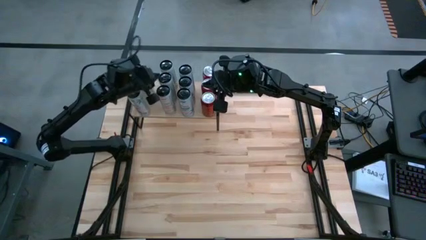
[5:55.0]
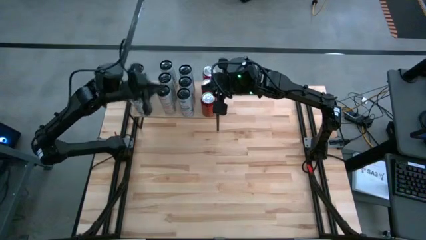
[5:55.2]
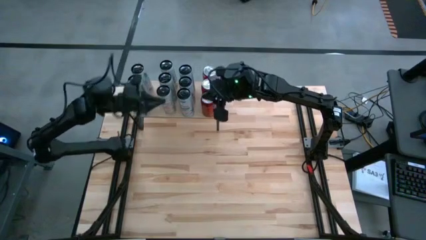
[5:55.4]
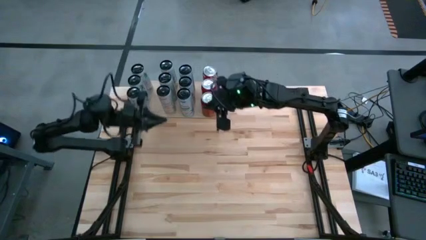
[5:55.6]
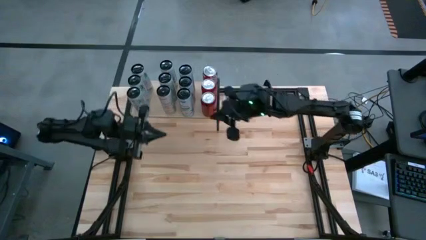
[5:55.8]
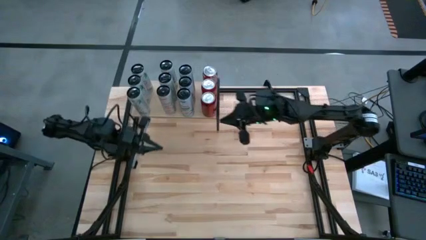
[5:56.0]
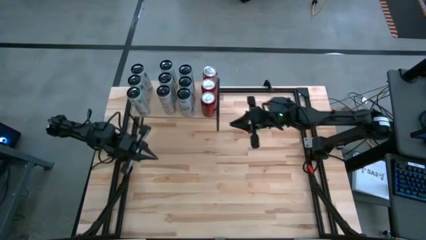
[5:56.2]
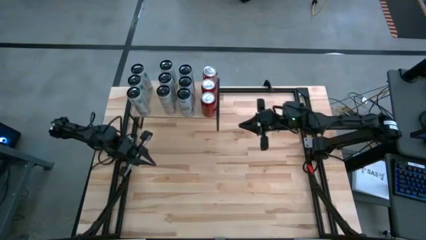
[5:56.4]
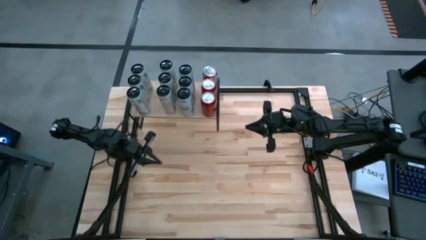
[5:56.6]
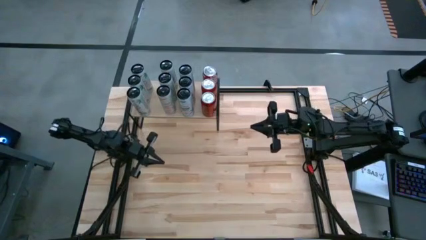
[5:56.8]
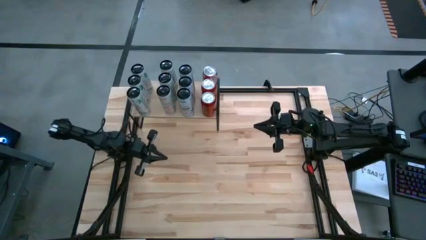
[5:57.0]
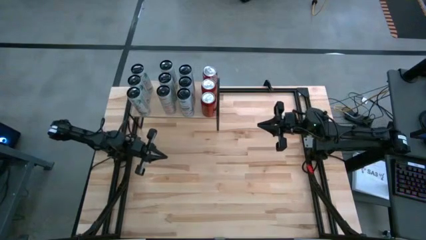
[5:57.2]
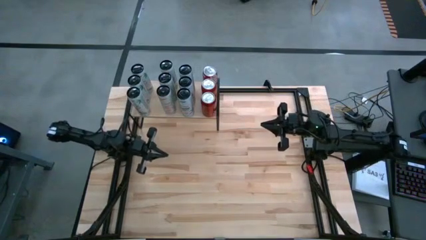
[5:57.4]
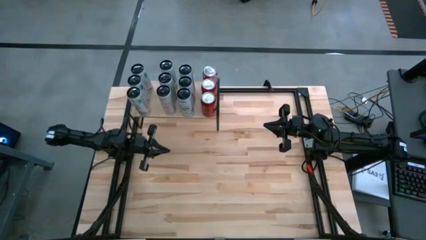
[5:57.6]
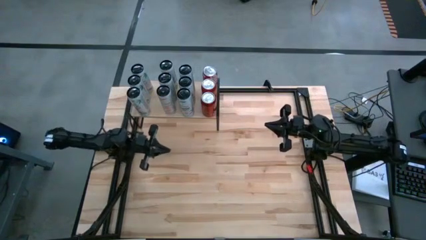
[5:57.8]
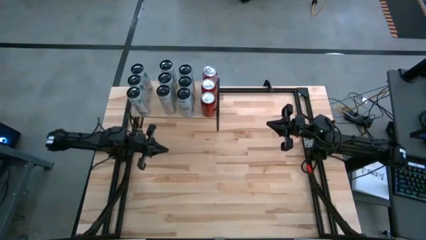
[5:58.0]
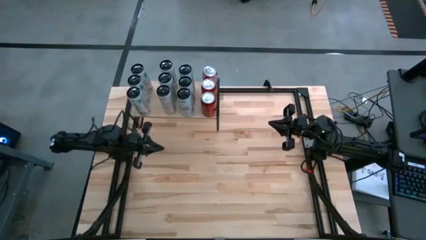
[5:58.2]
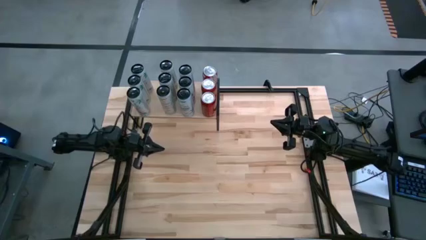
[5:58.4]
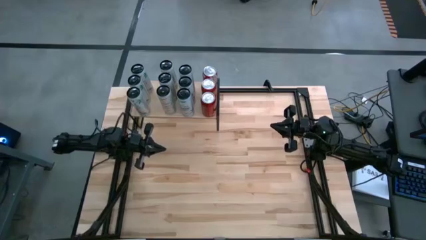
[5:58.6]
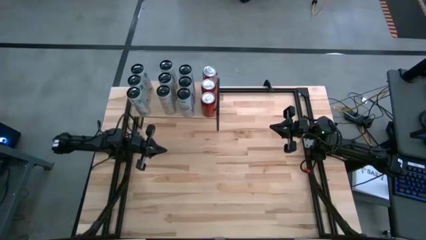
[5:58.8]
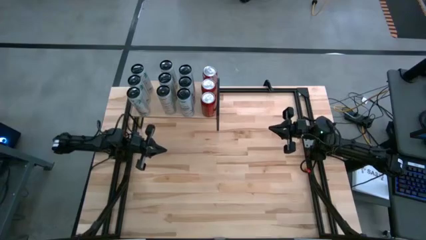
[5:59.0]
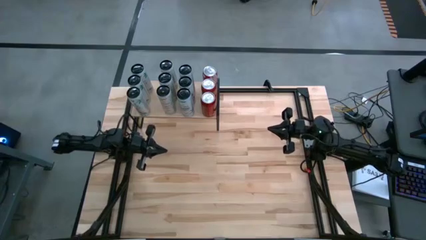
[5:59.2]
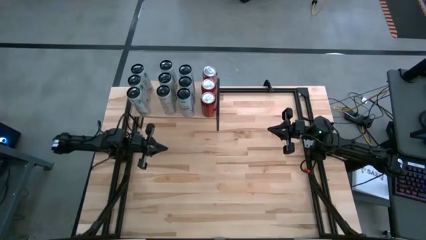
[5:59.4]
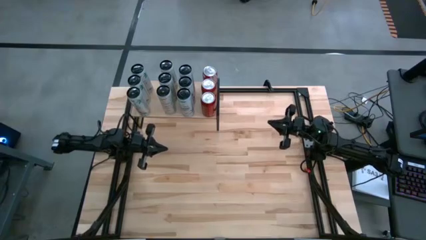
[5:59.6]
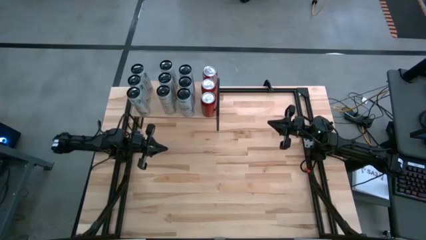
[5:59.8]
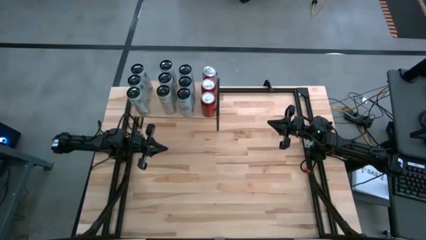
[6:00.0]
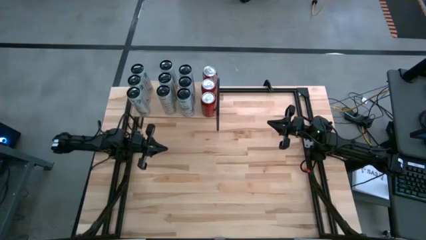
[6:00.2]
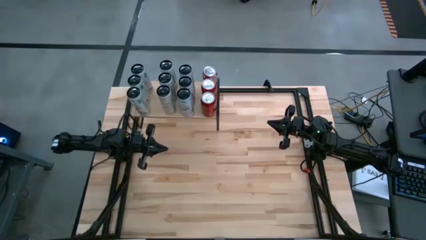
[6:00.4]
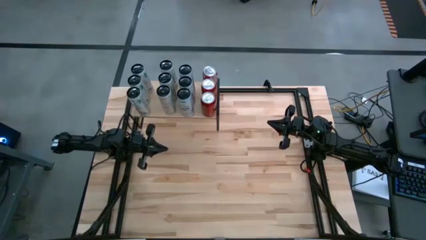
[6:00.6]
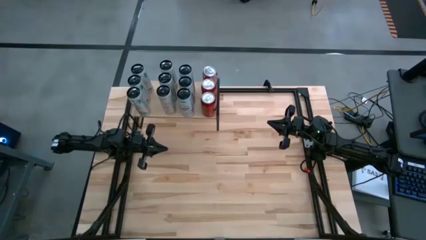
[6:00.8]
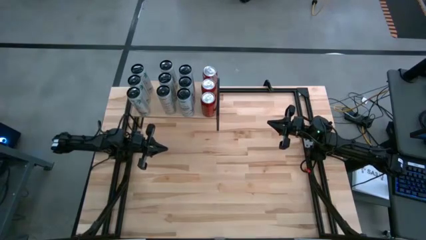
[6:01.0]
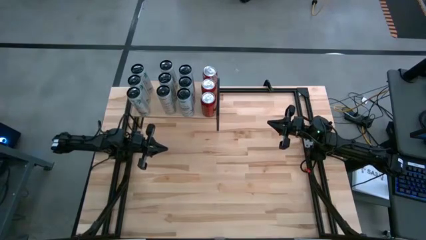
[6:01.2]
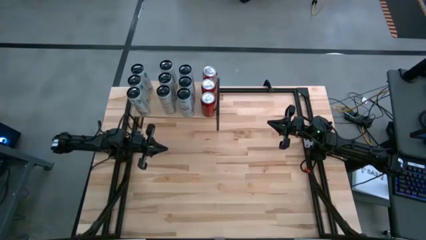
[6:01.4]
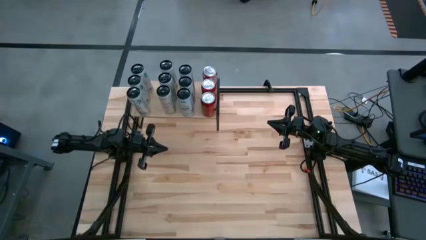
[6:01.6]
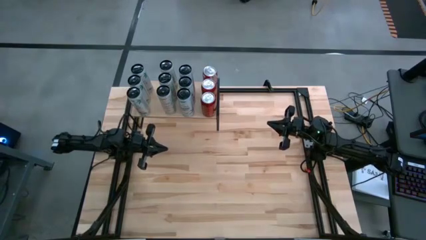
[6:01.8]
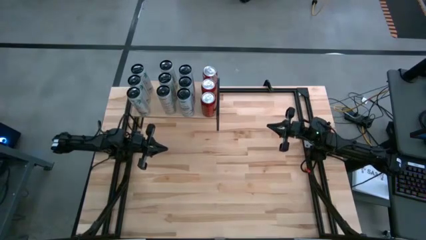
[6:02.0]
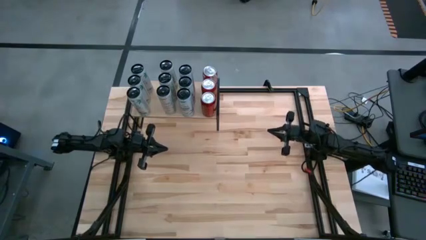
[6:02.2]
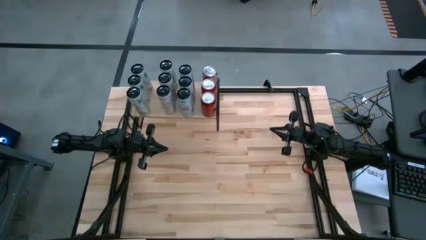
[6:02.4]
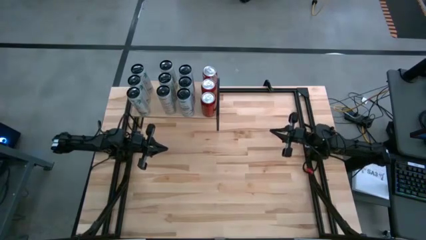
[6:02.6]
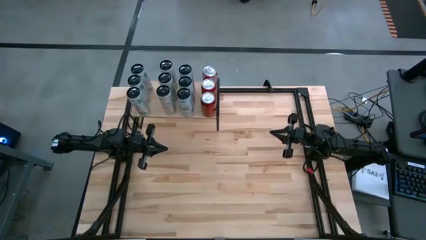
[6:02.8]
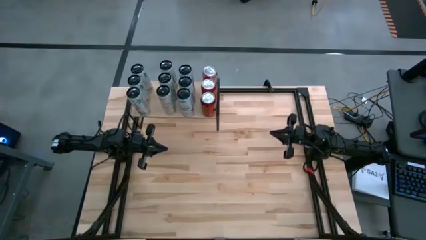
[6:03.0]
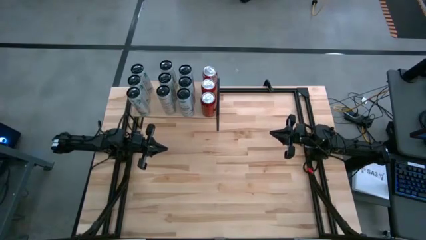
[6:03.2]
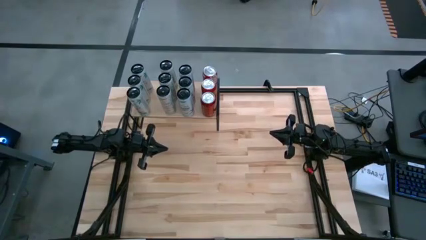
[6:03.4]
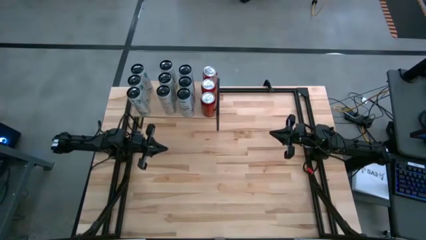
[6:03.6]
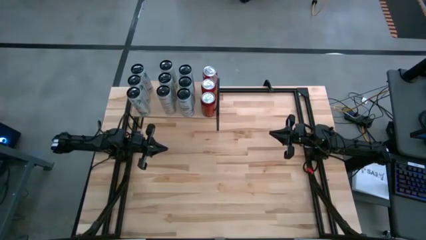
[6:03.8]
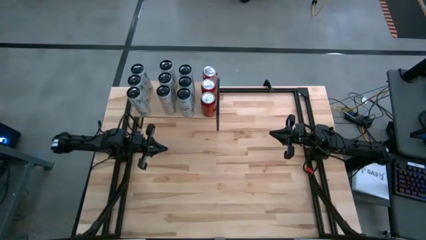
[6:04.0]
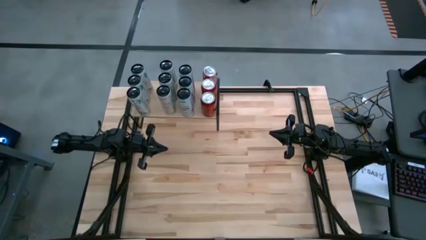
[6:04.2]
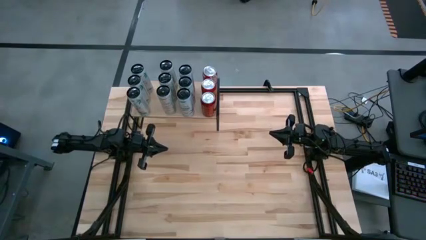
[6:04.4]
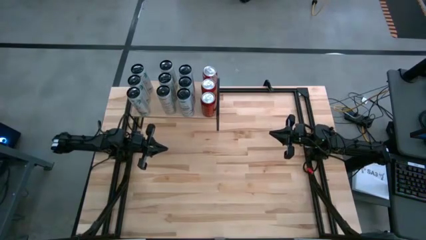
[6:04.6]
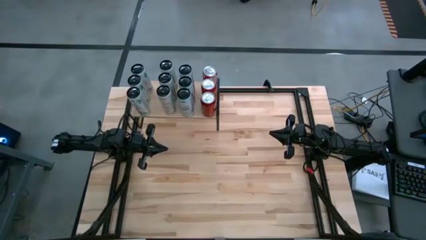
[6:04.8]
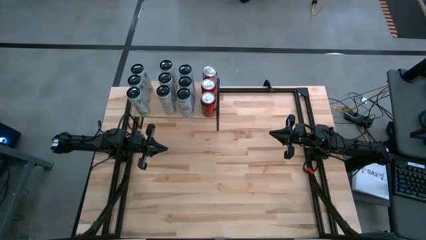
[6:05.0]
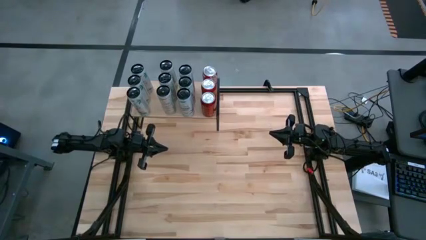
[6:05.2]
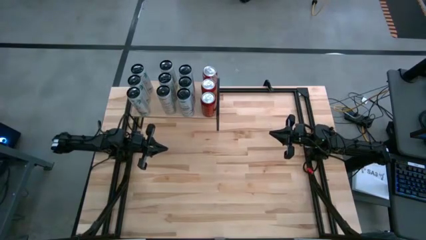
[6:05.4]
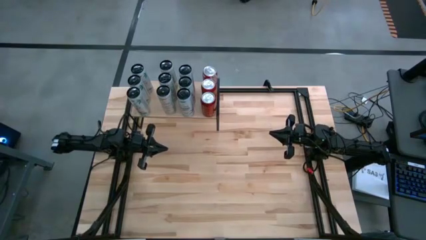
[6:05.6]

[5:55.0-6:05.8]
Task: Place canned beverage on shelf
Return to Home Position

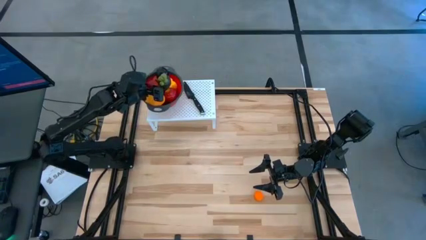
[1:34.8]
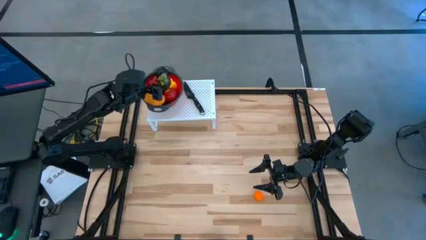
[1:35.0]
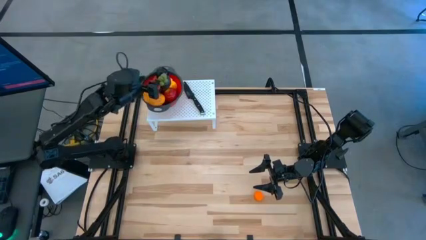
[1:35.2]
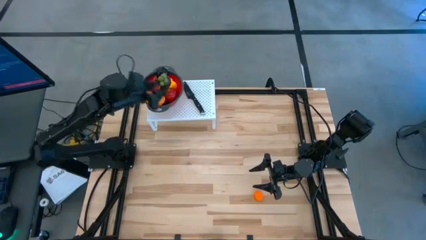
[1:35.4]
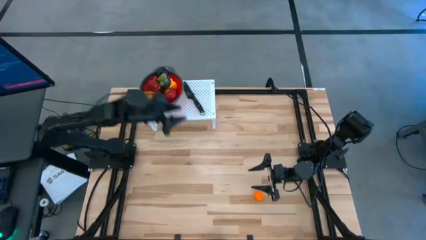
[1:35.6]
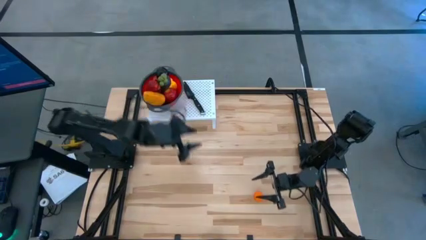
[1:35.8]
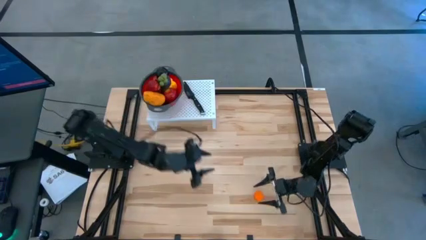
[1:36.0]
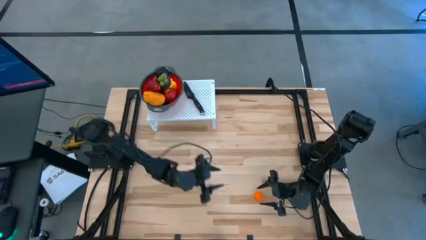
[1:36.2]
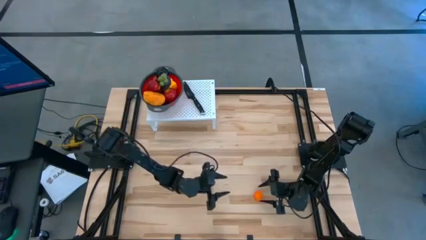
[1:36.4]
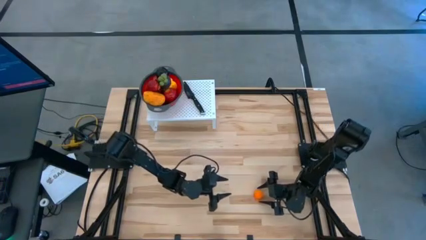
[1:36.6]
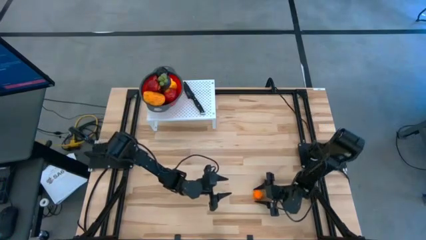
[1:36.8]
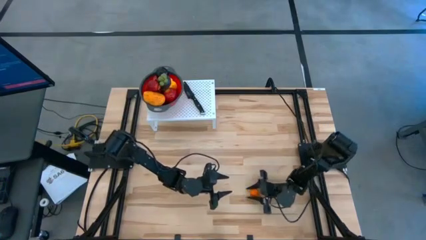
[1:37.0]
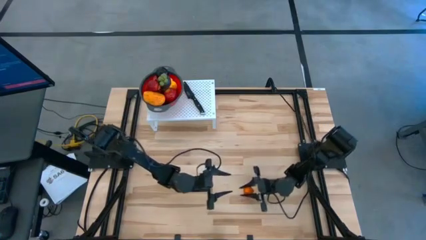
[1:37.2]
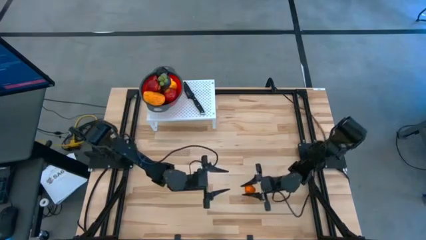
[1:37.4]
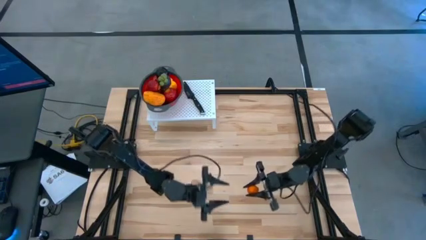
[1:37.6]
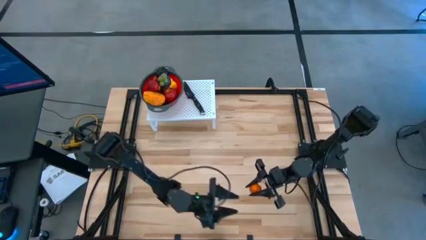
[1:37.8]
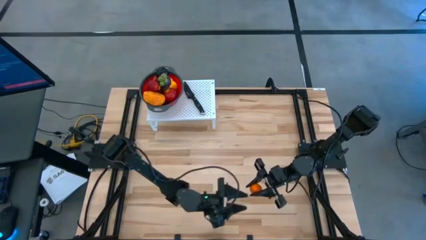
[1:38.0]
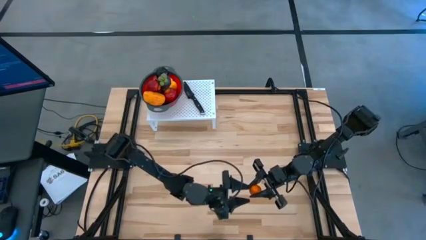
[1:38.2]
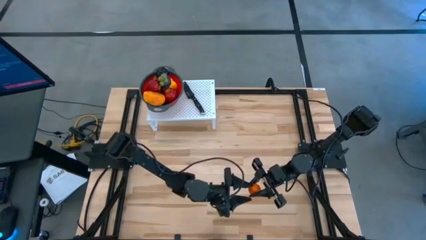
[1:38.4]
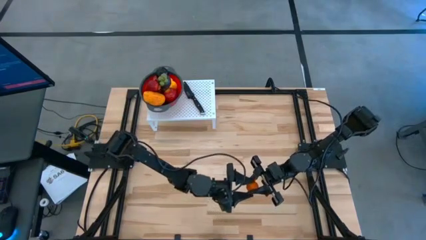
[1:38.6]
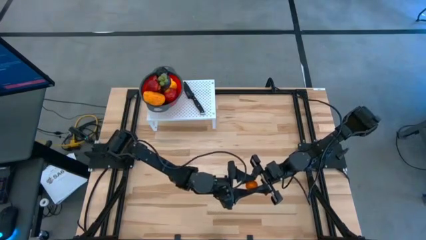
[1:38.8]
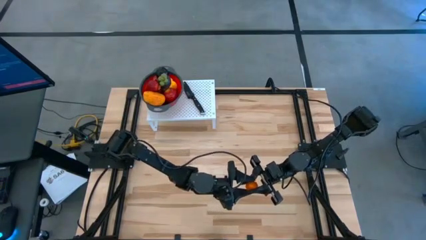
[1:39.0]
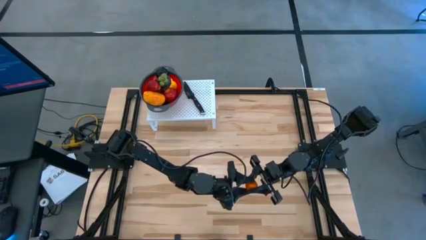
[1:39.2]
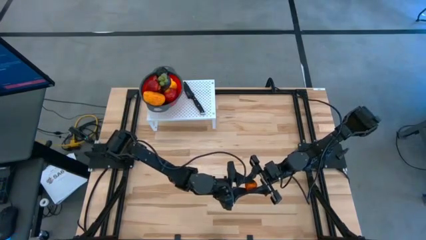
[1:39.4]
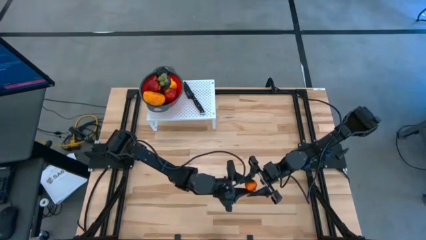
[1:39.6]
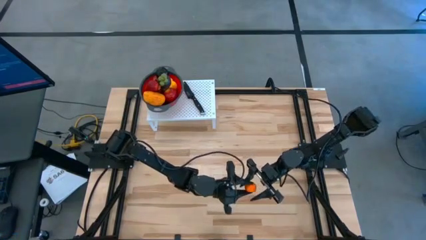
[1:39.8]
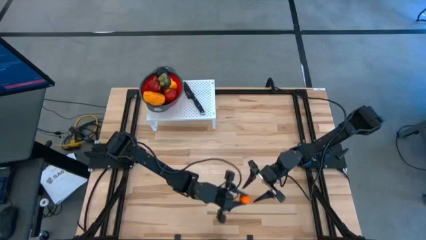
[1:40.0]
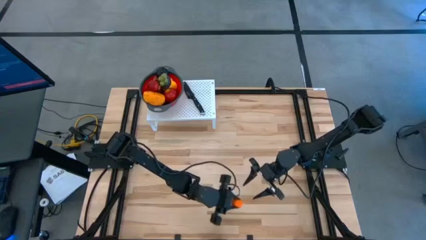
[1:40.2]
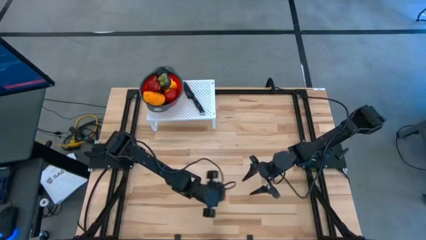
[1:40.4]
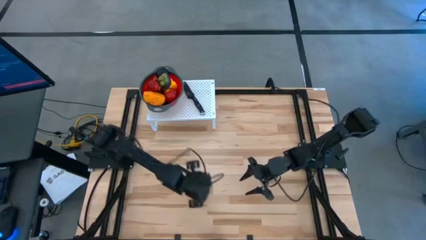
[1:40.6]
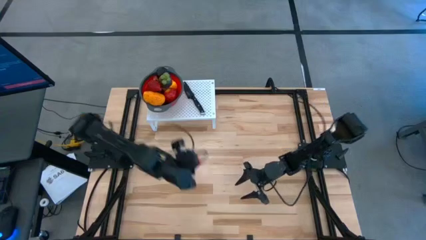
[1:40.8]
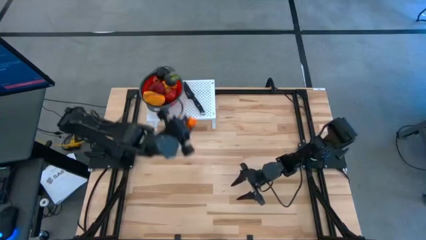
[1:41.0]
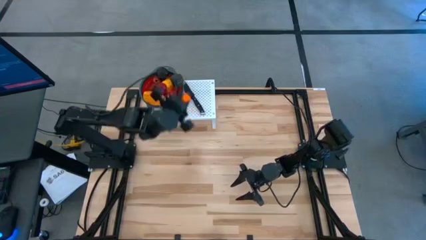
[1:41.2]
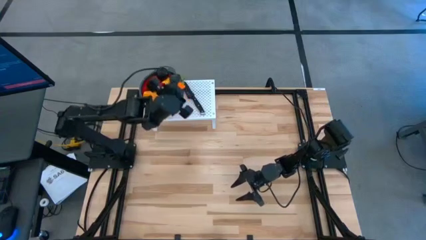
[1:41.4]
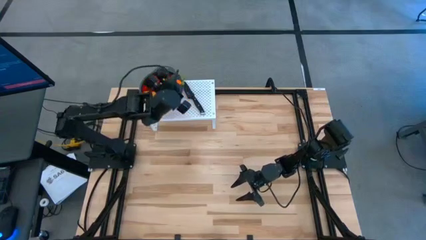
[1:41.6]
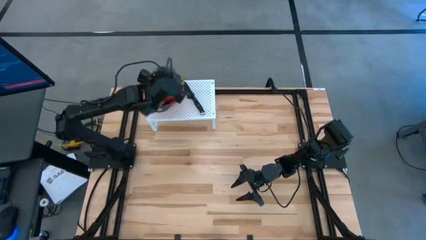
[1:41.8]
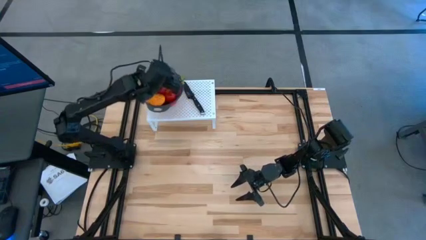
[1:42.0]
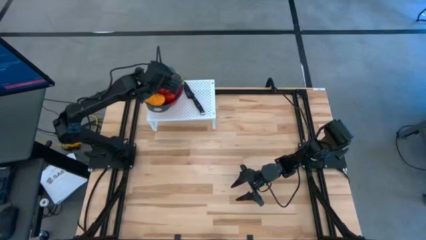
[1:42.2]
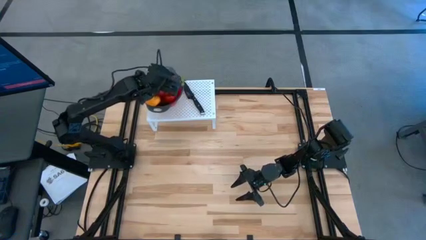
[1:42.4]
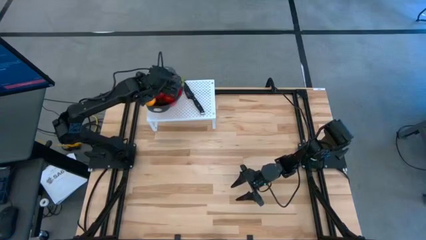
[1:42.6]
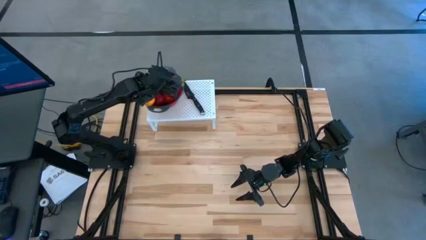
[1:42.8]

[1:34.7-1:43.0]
Task: Pick & Place Fruit
Put the orange into the red strainer bowl on the shelf
